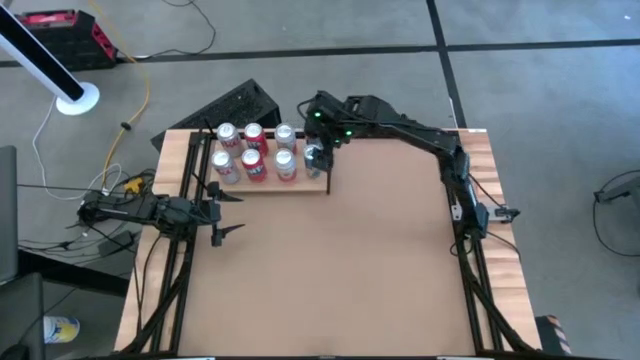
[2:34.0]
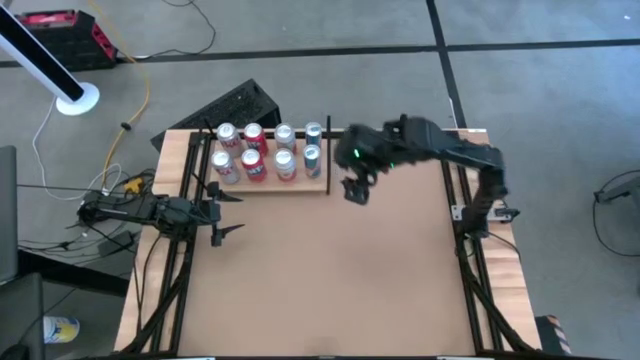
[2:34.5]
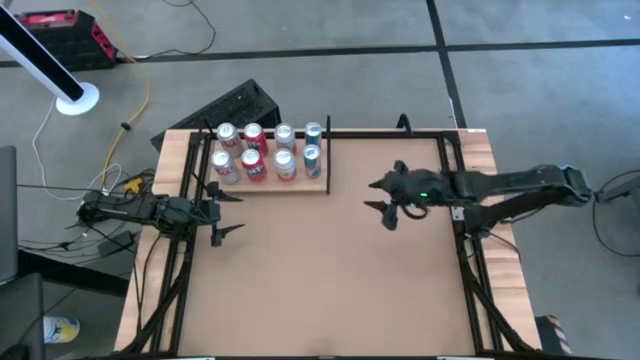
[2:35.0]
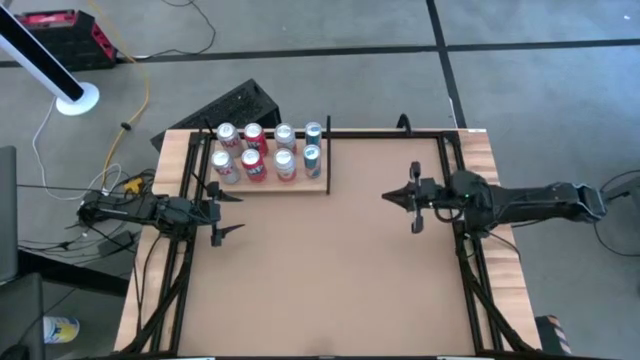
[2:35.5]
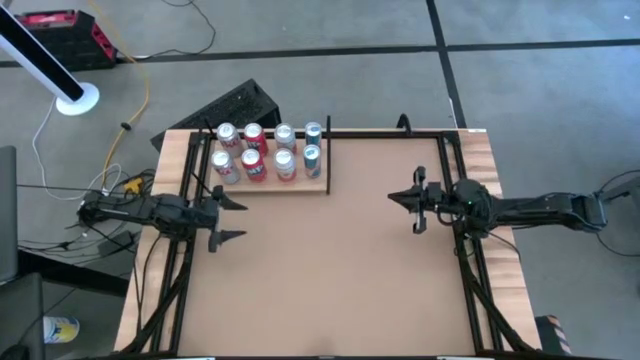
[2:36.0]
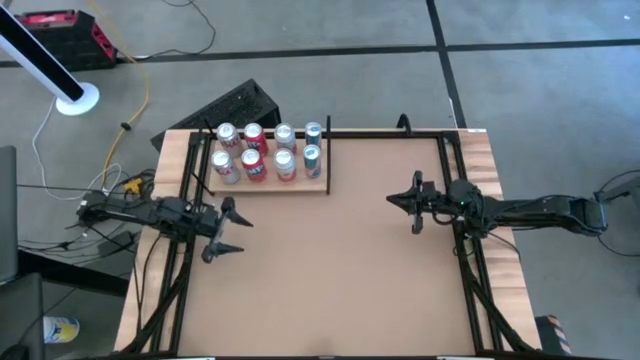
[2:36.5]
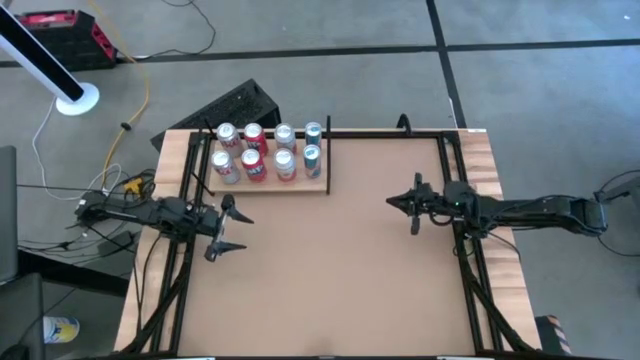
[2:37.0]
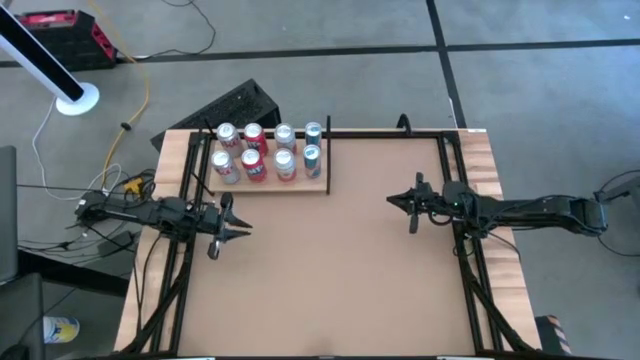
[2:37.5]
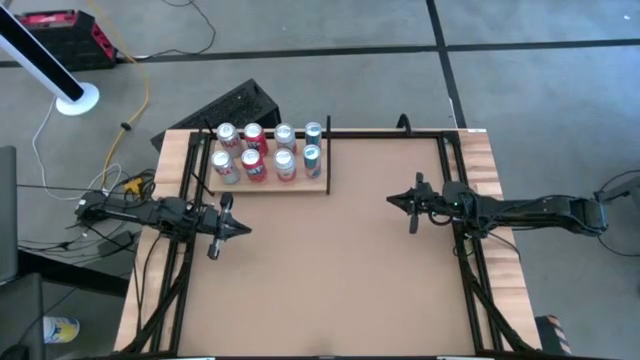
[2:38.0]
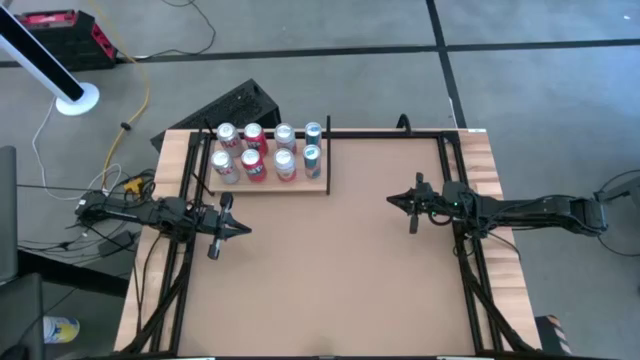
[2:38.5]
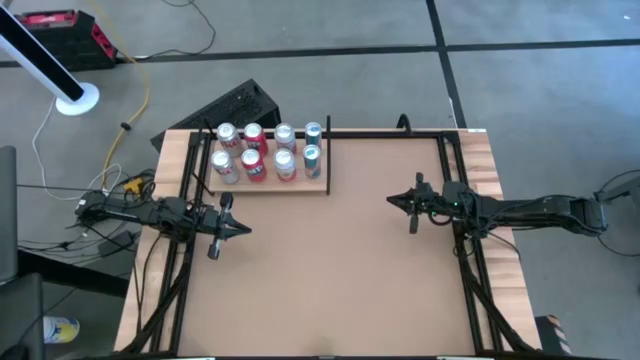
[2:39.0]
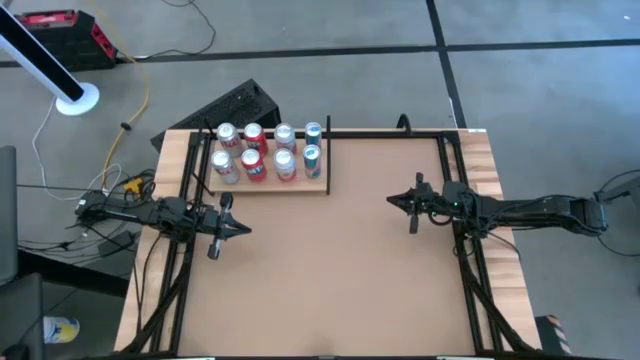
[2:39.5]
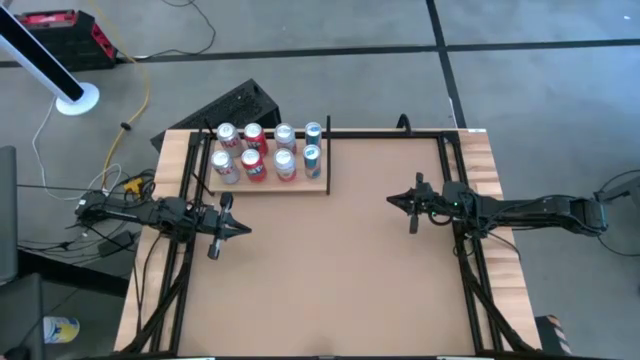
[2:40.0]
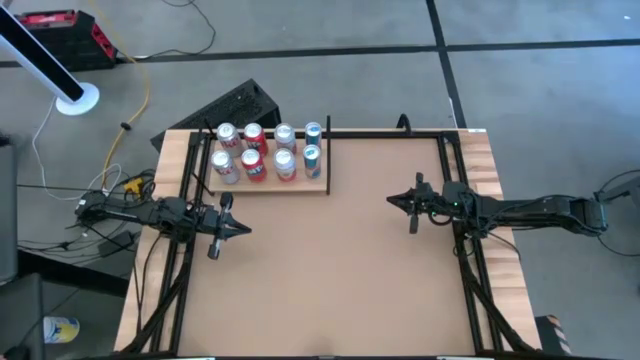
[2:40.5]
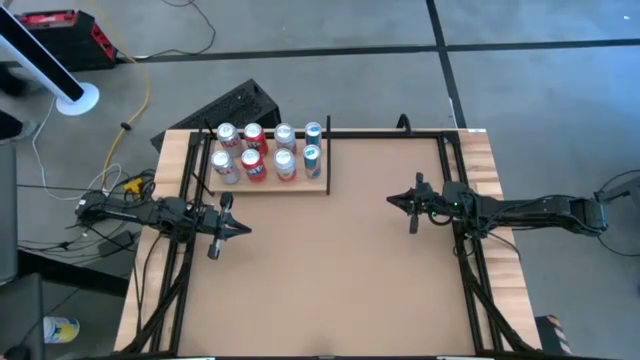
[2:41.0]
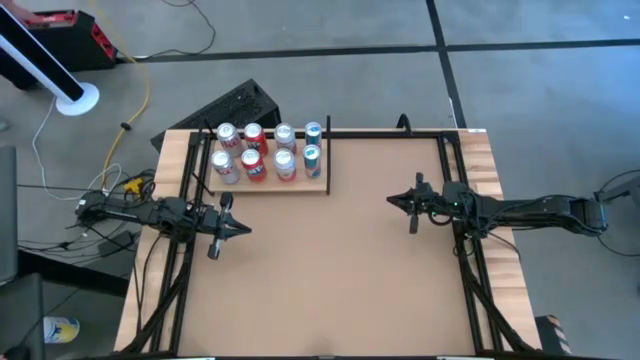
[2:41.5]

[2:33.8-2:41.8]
Task: Place canned beverage on shelf
Return to Home Position

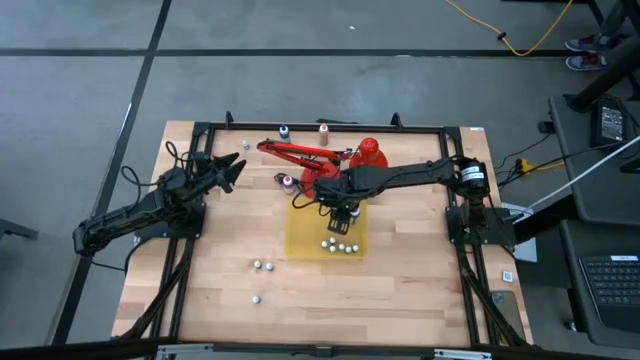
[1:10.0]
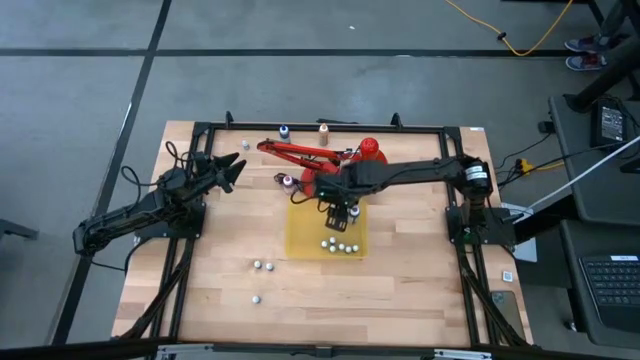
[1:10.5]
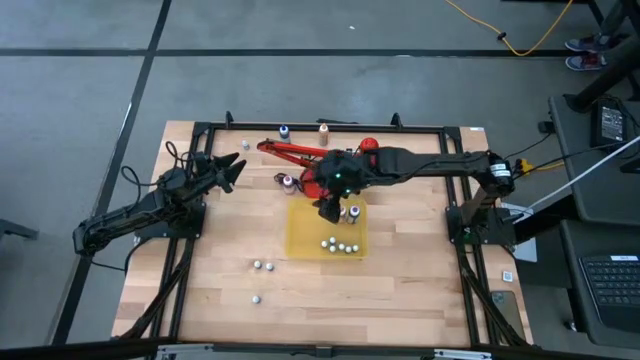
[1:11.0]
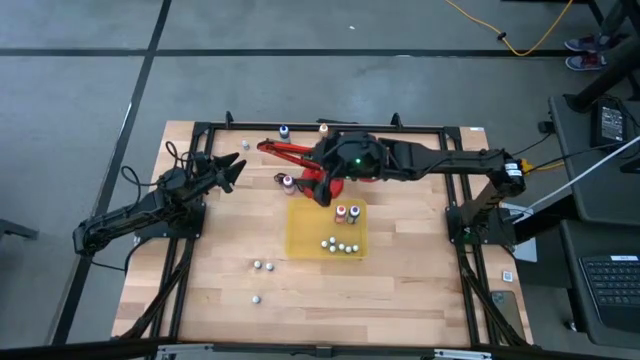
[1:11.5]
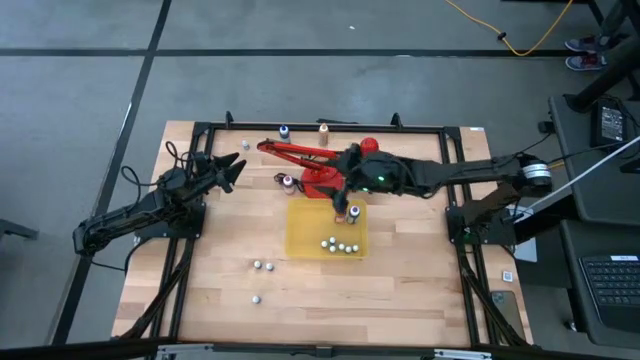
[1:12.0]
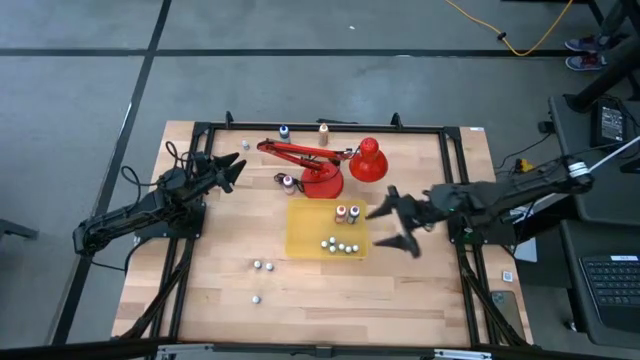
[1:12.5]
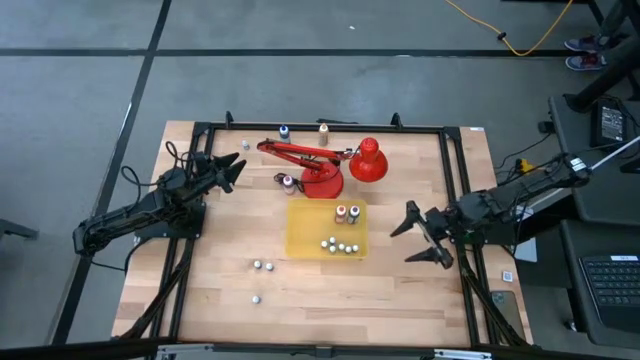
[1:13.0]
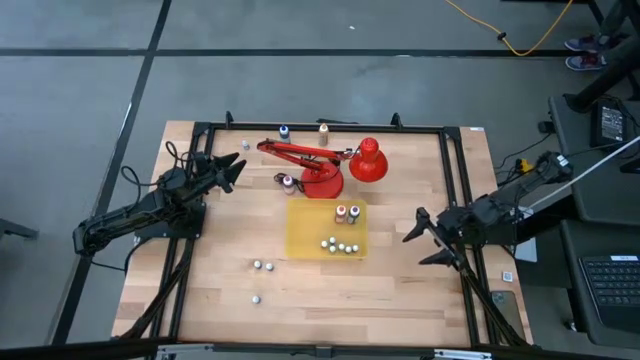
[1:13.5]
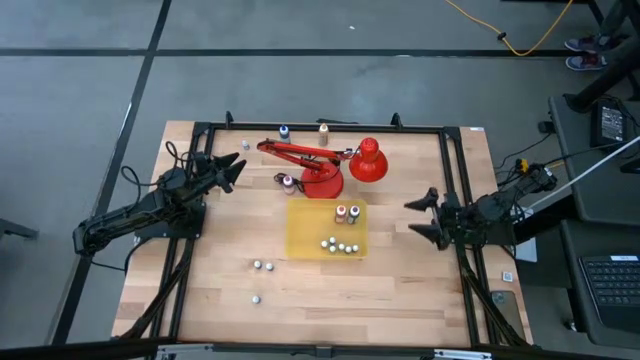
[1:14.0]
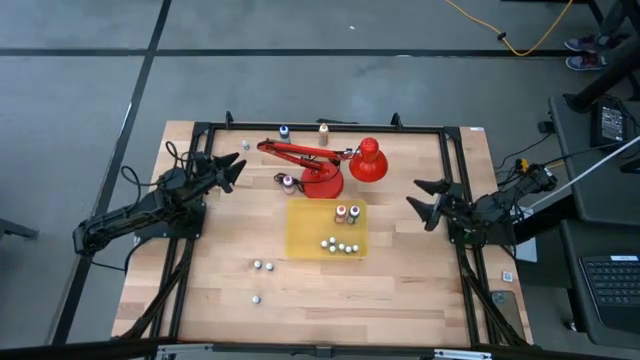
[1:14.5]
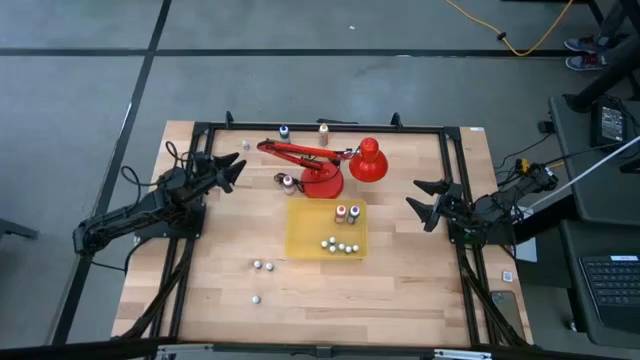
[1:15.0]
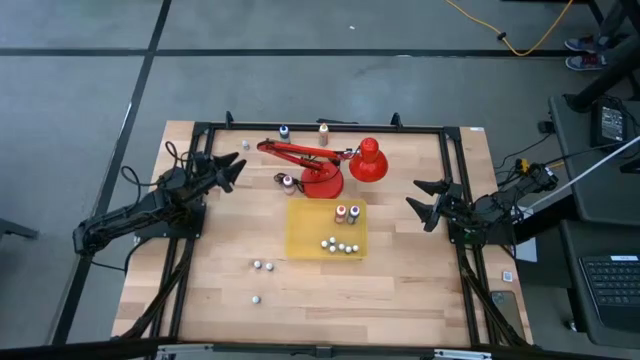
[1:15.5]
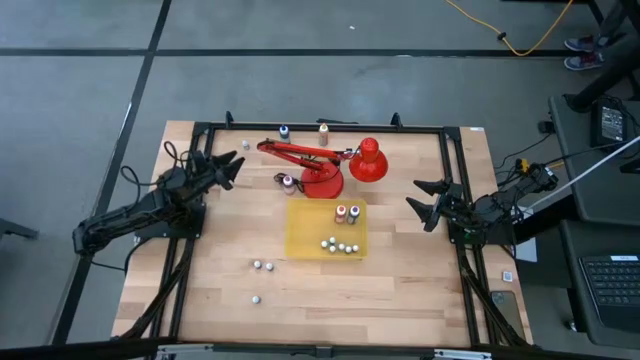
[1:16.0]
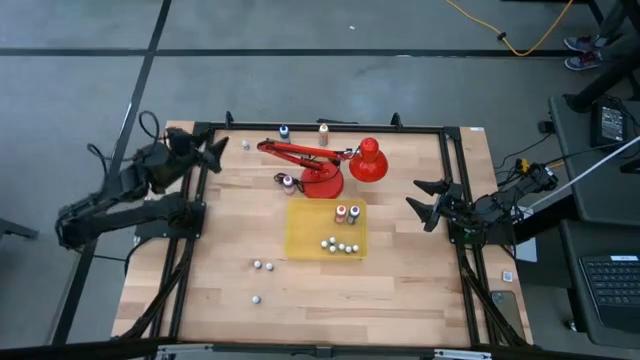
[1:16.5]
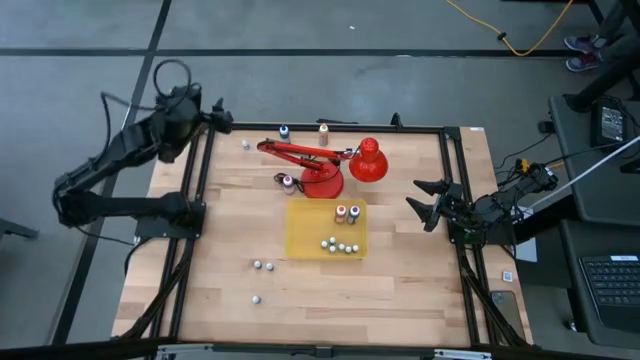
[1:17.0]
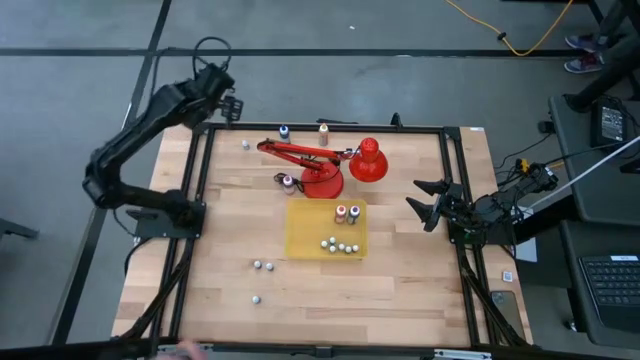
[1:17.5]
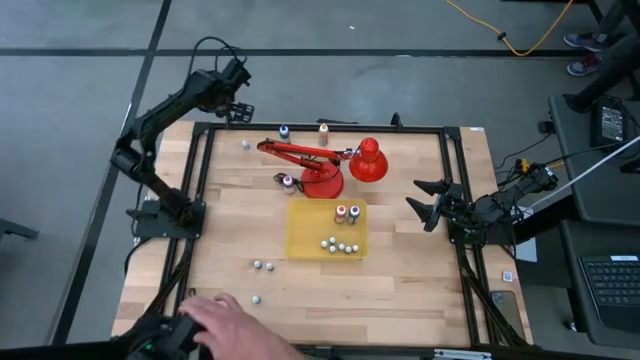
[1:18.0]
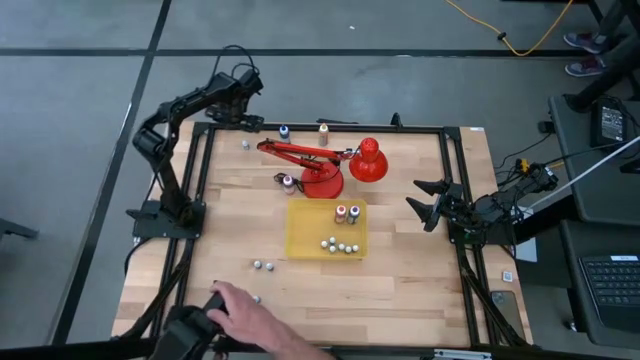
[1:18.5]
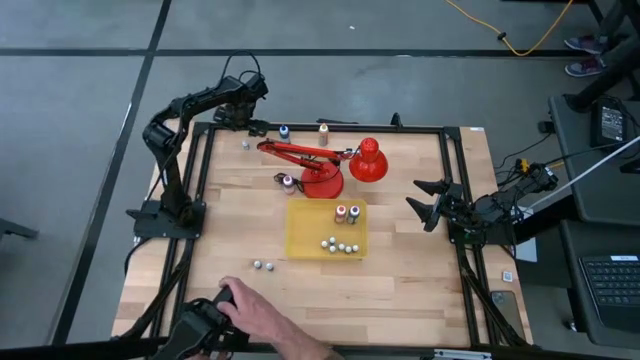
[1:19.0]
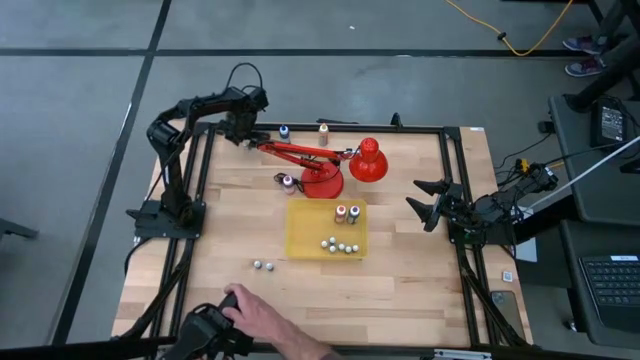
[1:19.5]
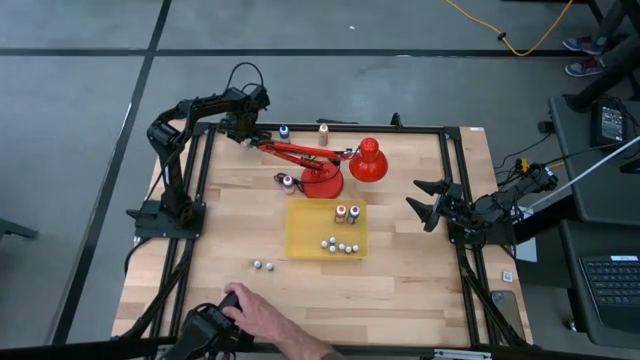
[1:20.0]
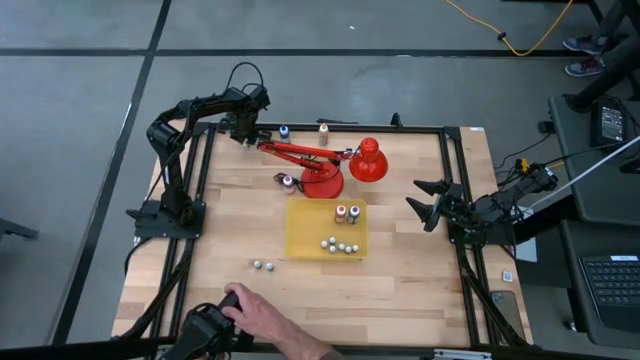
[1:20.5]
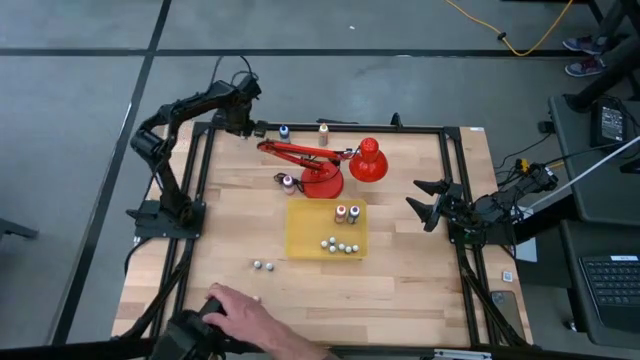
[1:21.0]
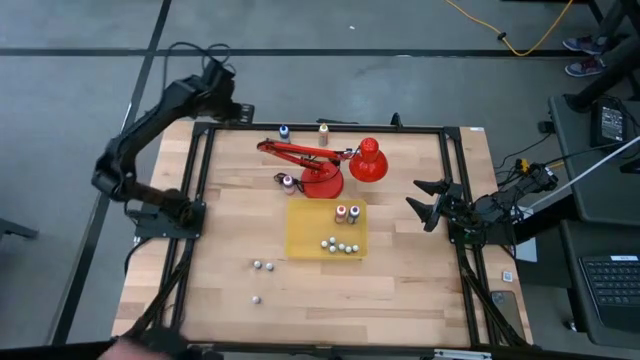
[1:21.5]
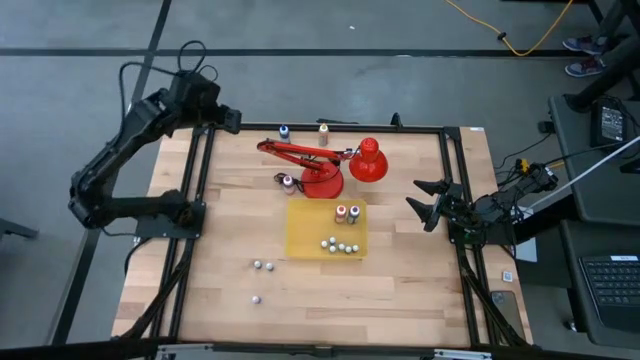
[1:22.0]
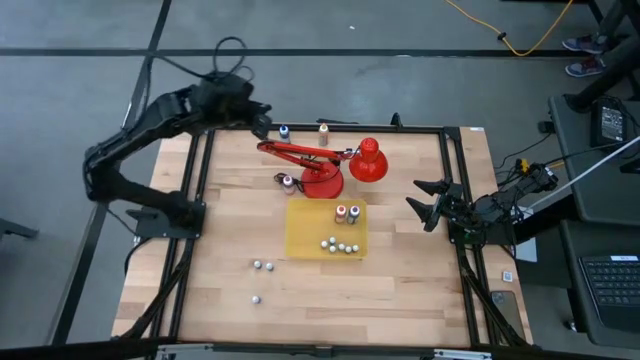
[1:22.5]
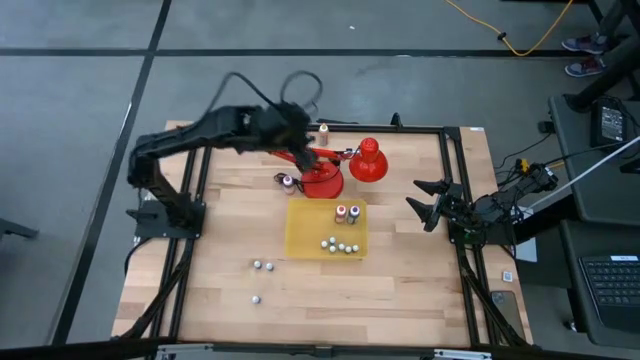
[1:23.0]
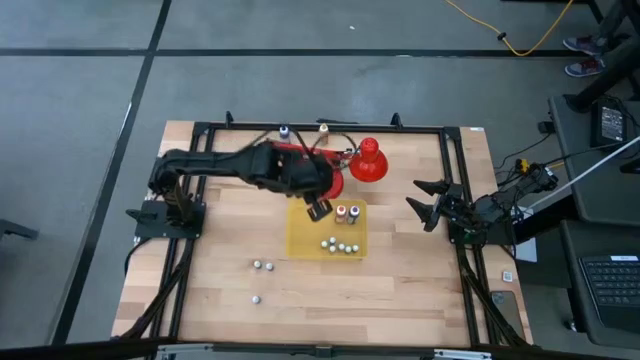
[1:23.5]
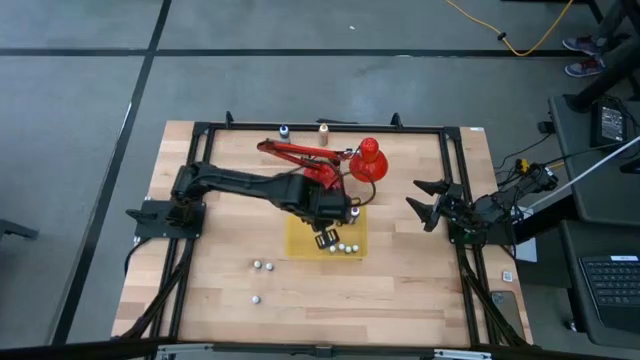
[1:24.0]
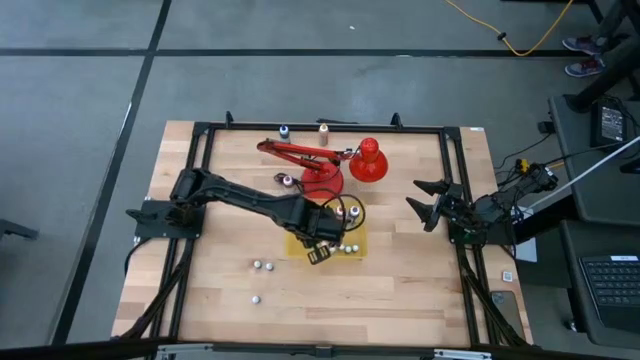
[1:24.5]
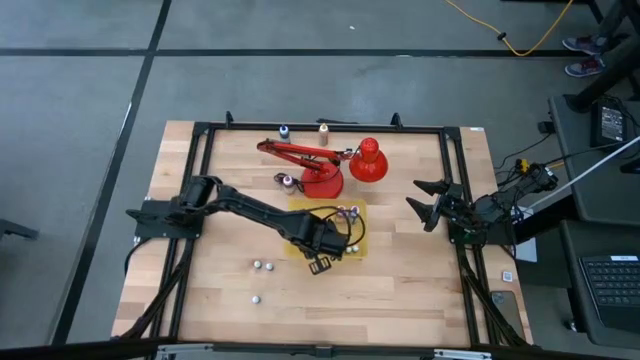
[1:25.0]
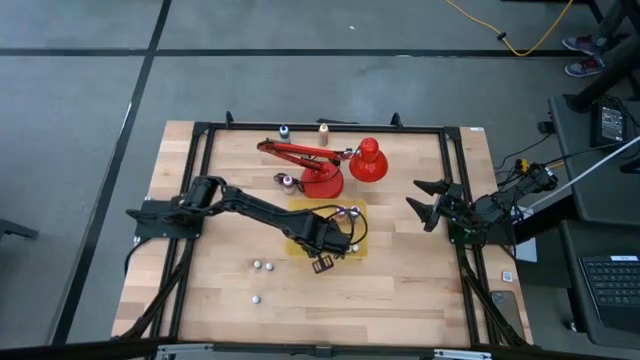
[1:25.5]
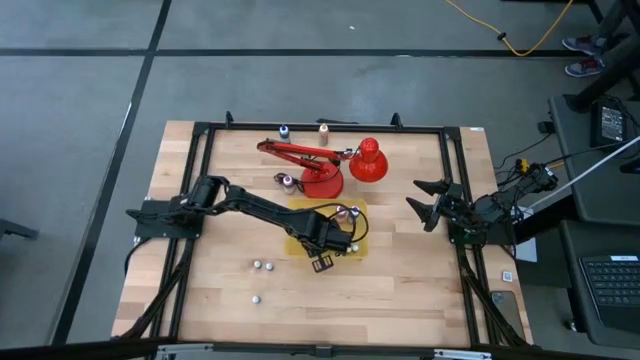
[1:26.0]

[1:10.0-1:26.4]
Task: Pick & Place food coloring
Put the small black food bottle into the yellow bin
